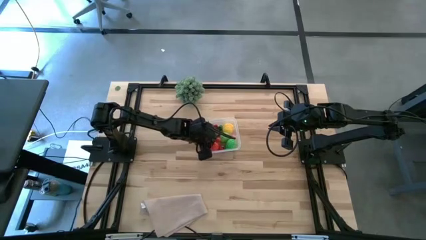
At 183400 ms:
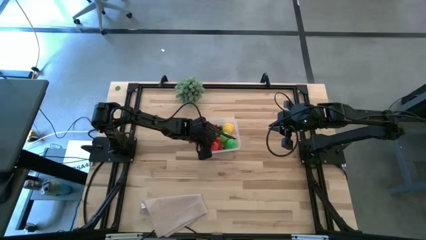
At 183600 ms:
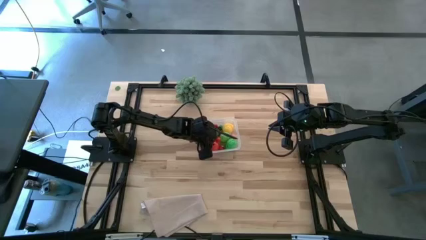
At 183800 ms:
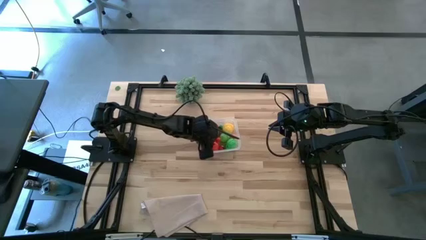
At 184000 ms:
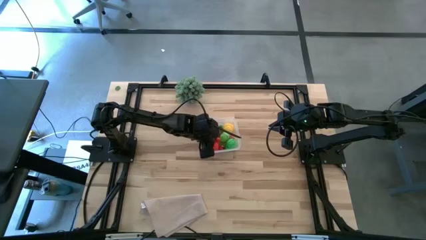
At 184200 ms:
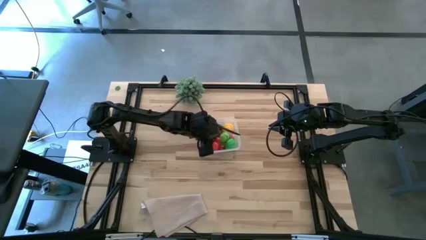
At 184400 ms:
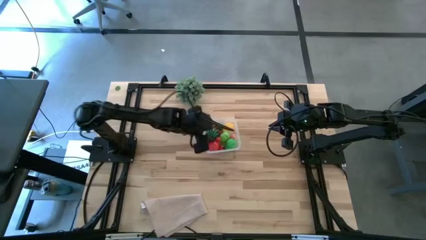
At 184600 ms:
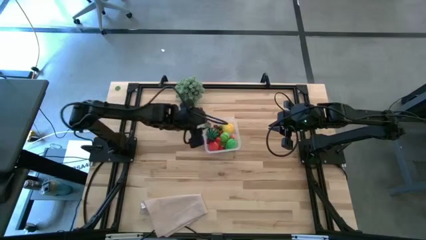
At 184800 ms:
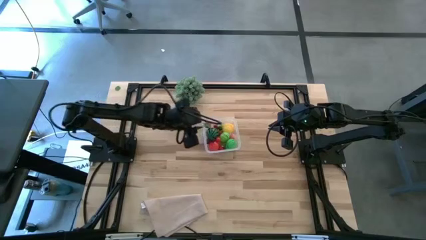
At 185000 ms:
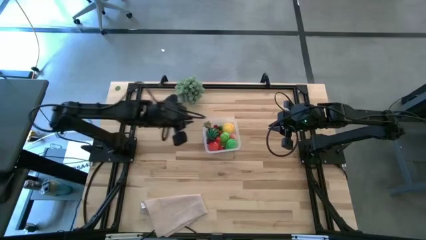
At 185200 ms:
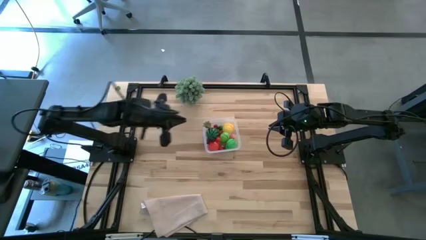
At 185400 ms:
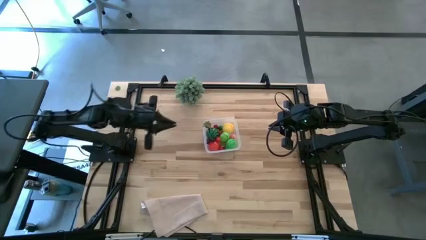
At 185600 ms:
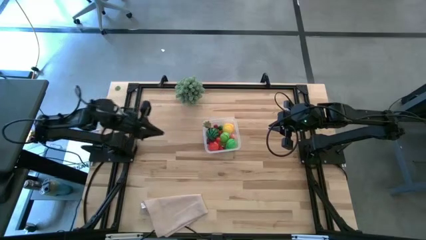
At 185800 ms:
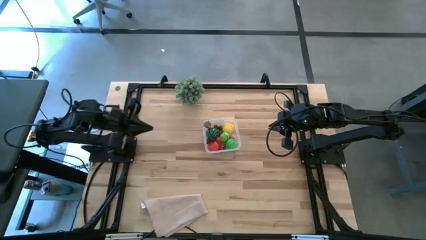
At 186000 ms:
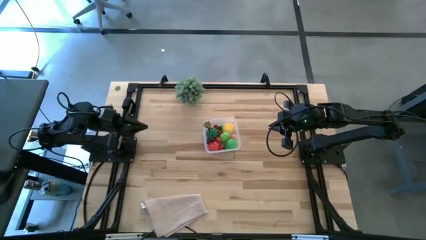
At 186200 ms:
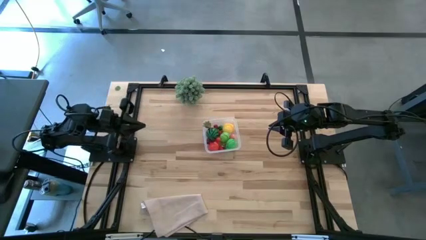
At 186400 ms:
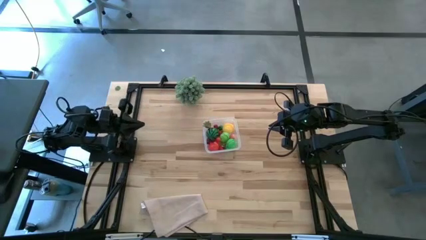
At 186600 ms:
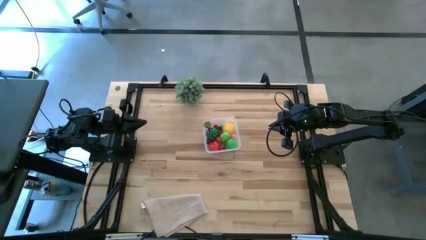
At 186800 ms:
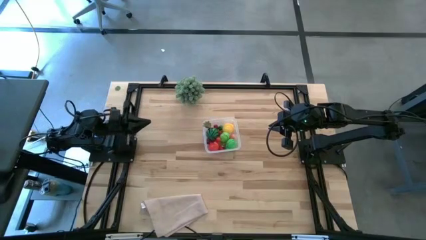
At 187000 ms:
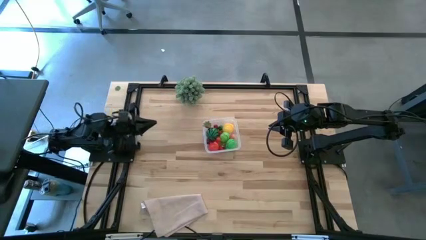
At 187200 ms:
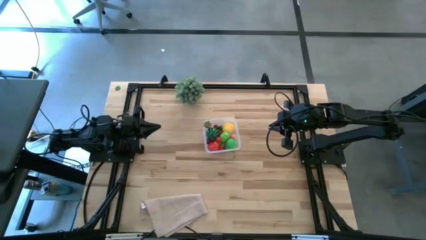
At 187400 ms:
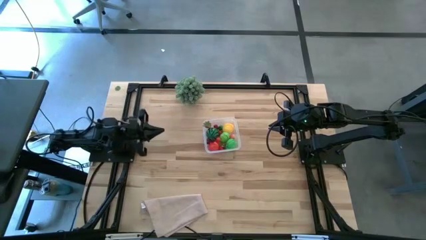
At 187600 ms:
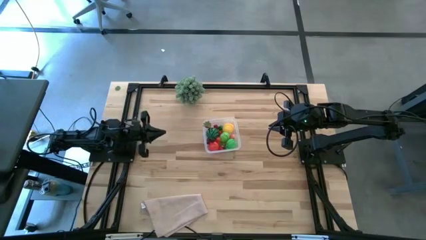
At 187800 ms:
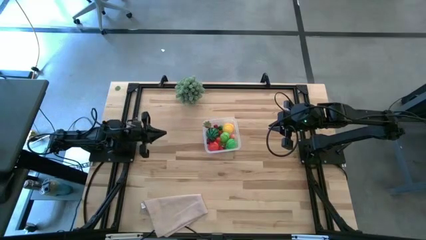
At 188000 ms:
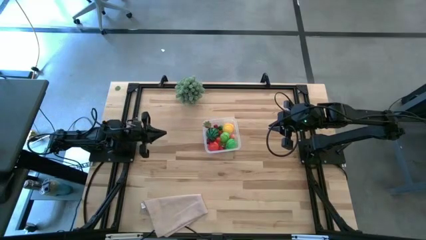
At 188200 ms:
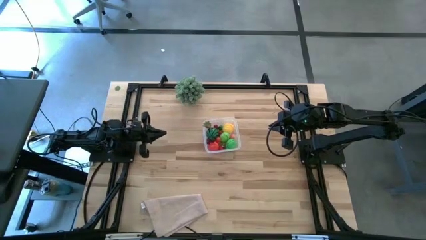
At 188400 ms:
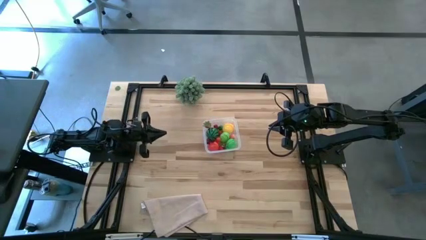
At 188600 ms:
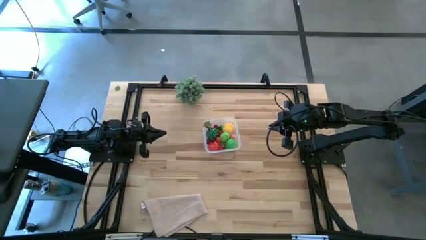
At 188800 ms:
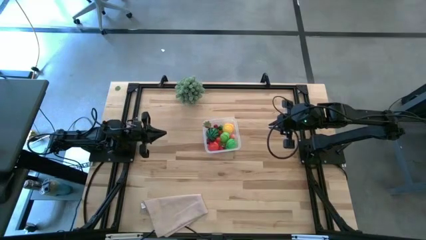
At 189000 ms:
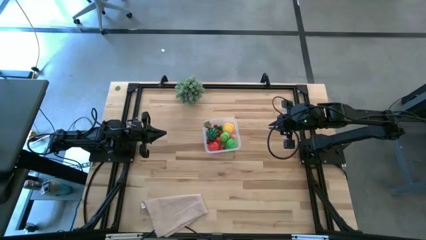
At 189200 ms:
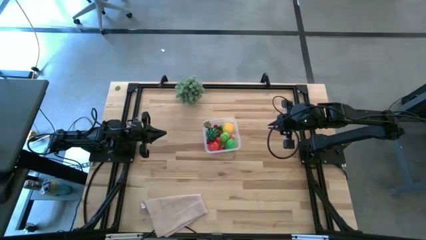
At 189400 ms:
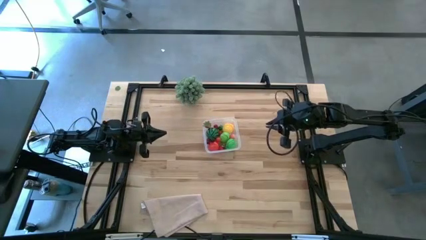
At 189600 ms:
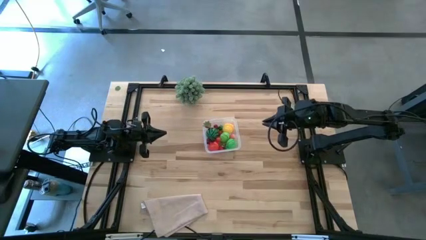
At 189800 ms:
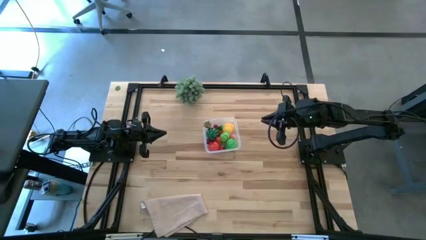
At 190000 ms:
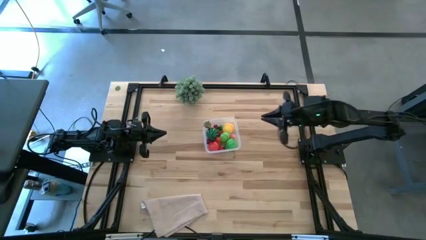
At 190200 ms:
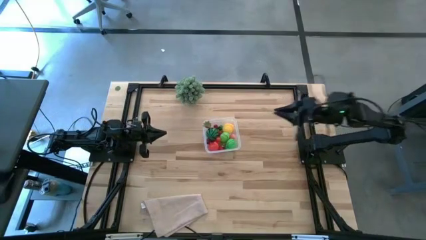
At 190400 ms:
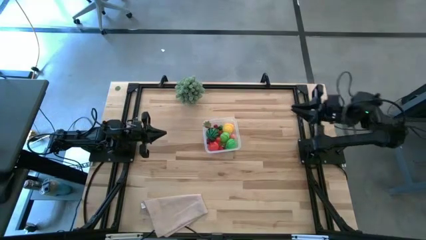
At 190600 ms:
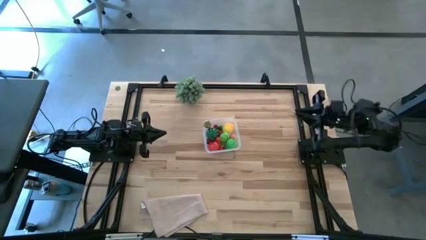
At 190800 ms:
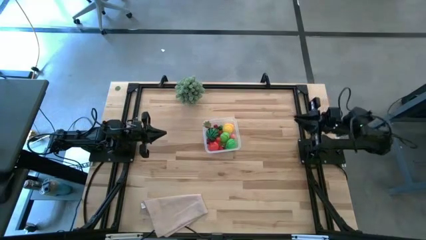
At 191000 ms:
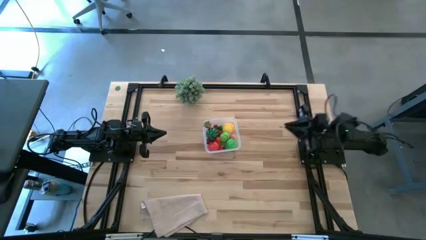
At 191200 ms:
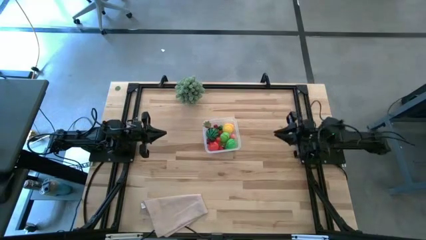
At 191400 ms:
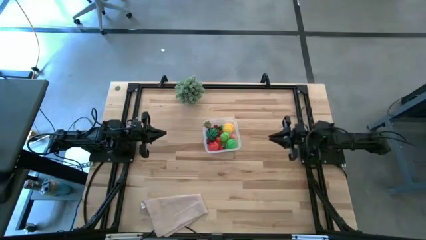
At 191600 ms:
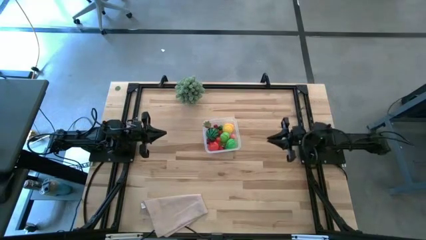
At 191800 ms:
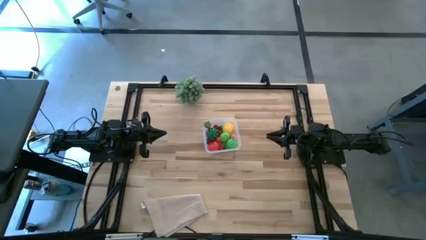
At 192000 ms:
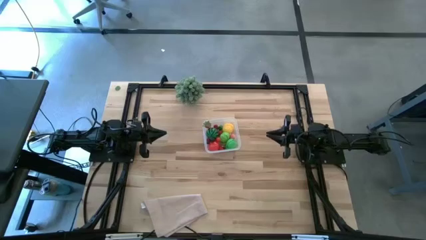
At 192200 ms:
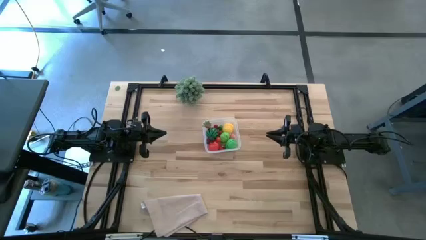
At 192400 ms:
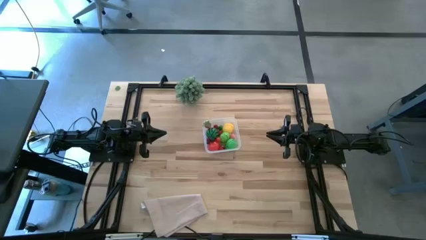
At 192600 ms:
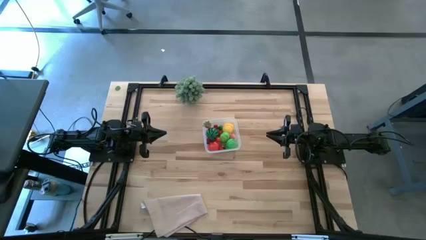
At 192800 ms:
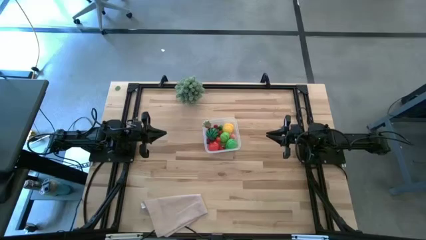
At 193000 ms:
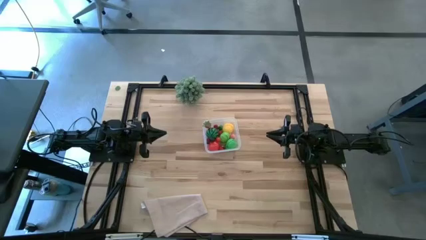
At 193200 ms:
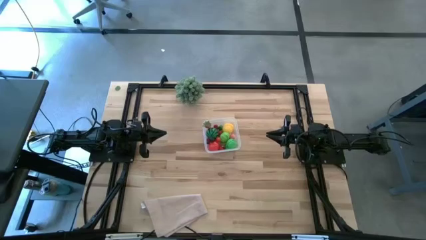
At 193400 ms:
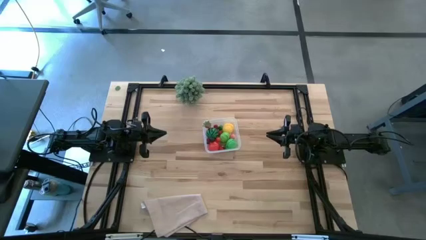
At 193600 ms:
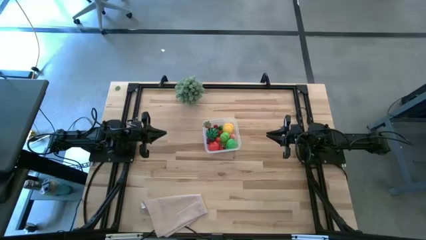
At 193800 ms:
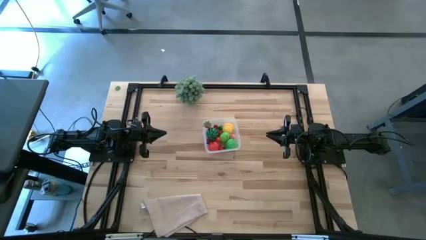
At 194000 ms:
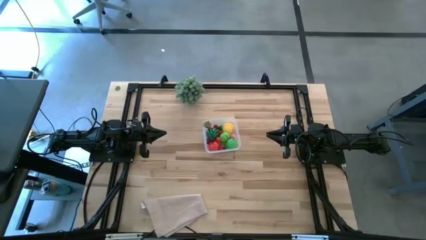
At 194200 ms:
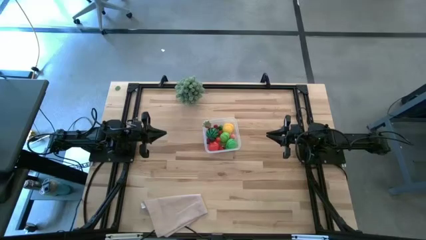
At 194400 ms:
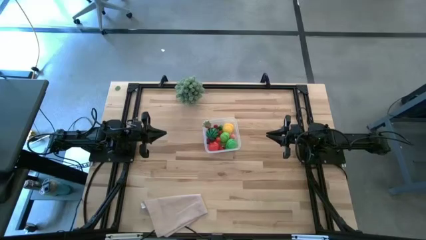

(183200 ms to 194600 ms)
Task: Pick and placing Produce into tupperware
Return to Home Position

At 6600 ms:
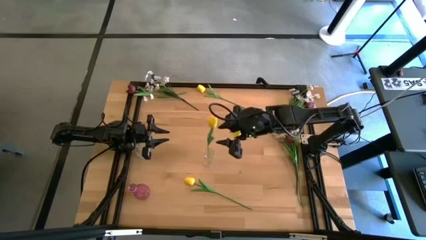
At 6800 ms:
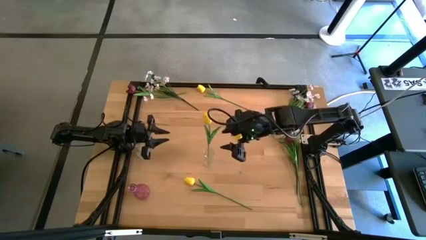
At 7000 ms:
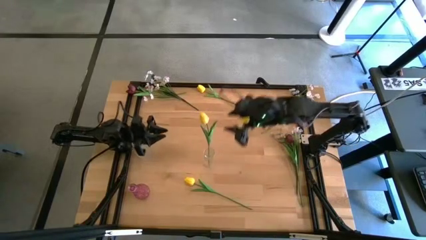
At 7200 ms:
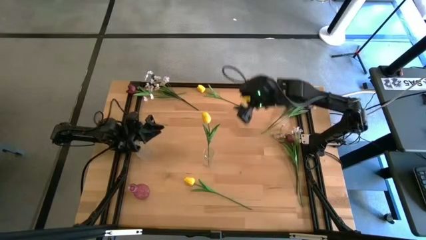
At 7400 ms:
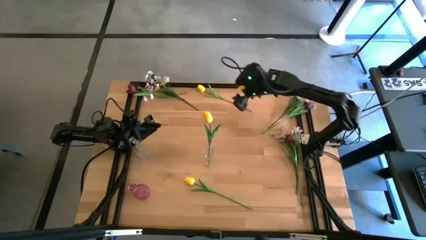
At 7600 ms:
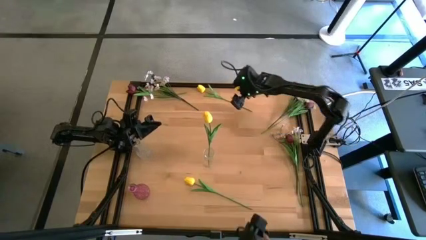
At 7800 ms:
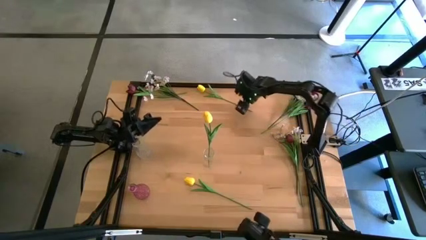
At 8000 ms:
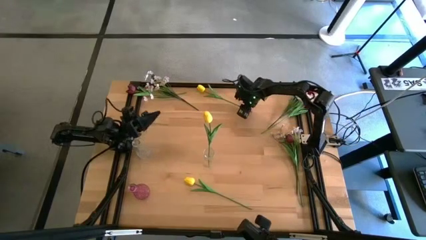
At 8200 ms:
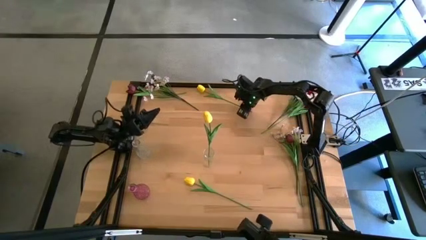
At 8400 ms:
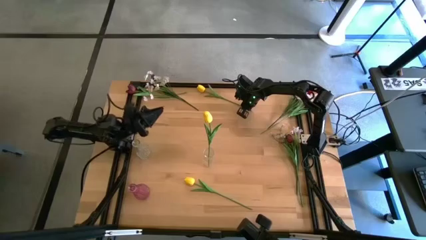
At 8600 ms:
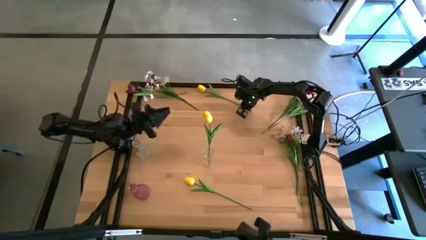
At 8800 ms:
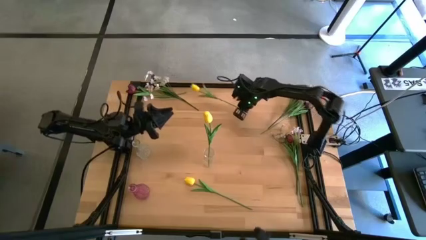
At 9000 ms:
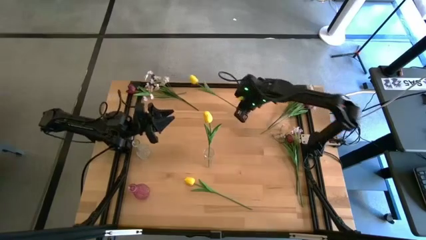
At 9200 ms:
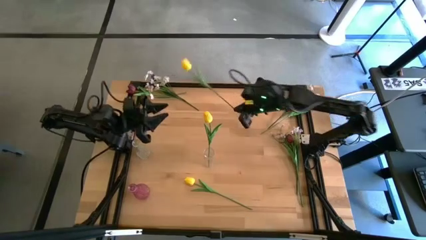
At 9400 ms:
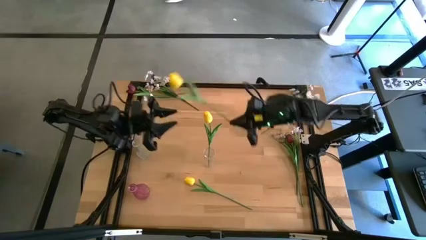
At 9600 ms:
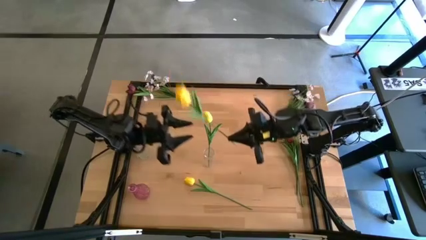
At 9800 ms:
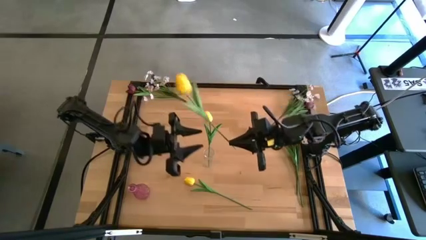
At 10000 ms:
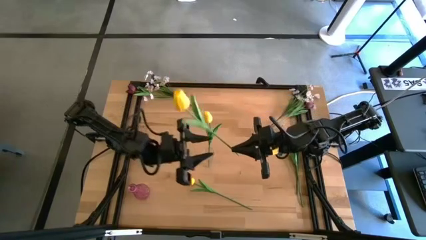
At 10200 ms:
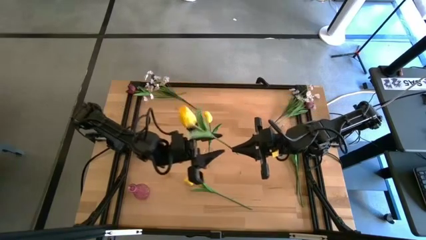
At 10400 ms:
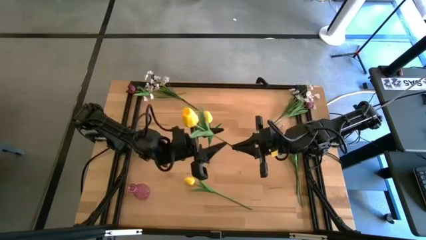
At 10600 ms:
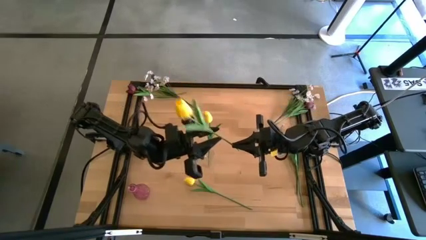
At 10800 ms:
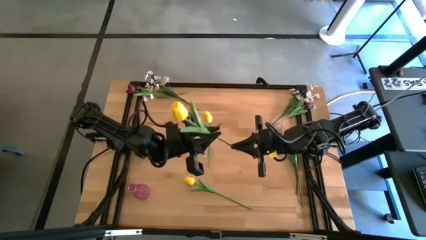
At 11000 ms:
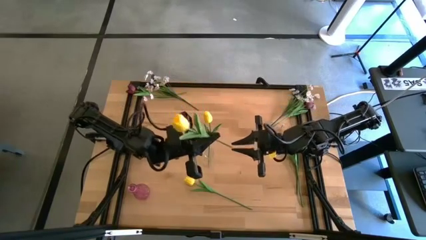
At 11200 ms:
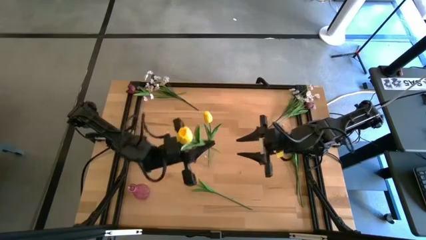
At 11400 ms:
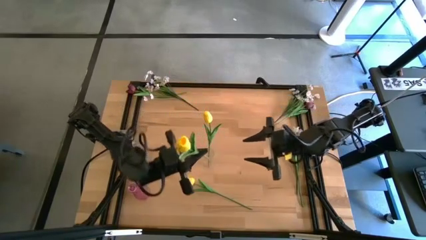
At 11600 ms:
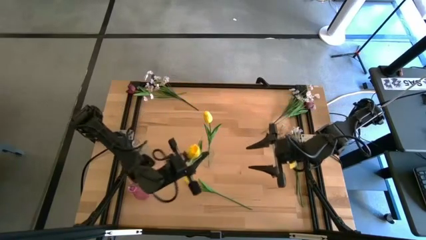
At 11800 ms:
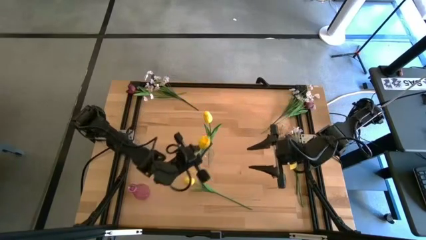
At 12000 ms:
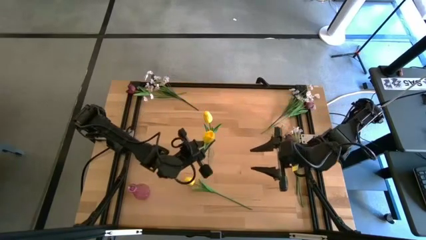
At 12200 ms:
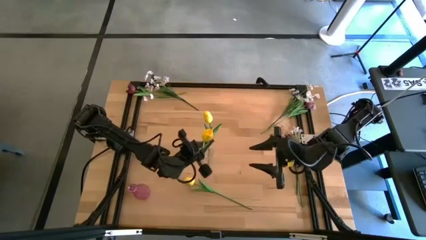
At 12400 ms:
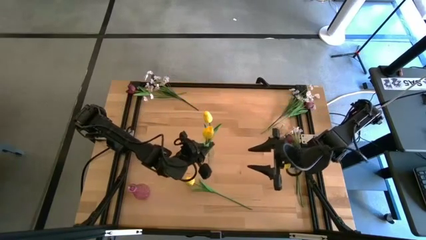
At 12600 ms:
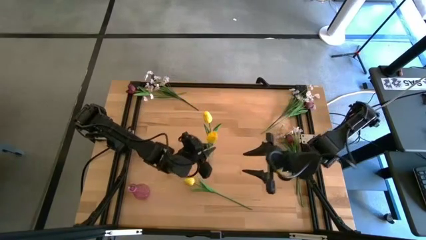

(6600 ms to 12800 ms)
Task: Sort flowers into vase by color
Put the top yellow flower into the right transparent vase
